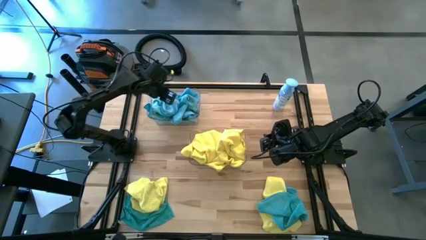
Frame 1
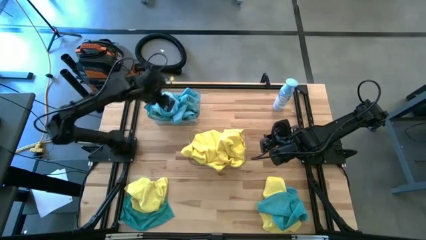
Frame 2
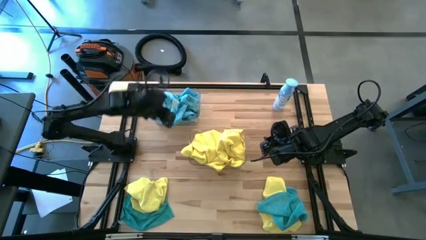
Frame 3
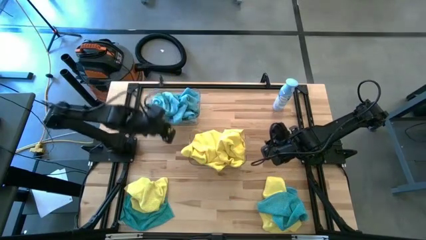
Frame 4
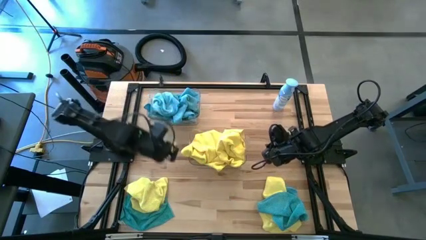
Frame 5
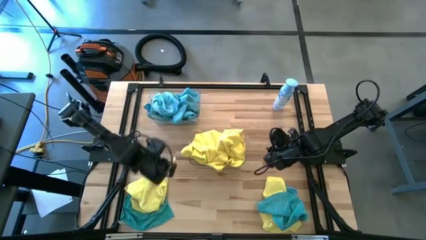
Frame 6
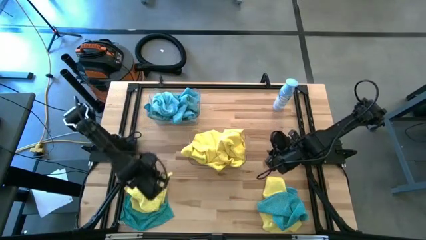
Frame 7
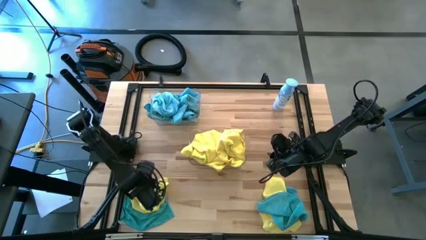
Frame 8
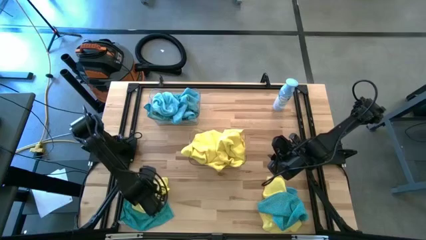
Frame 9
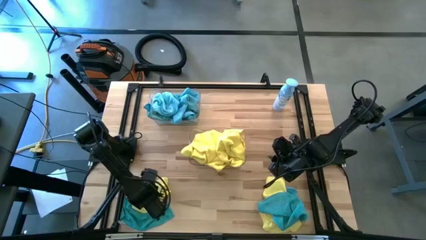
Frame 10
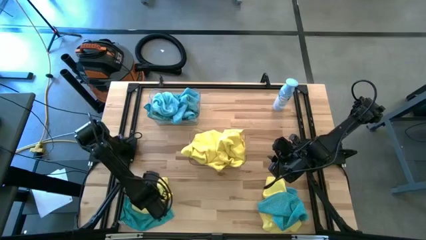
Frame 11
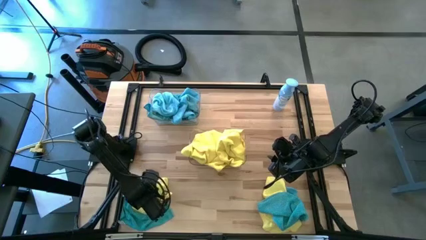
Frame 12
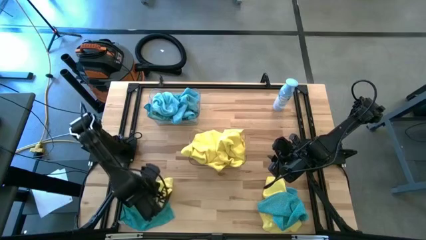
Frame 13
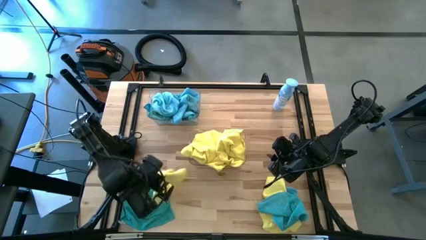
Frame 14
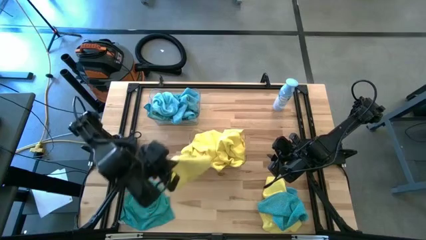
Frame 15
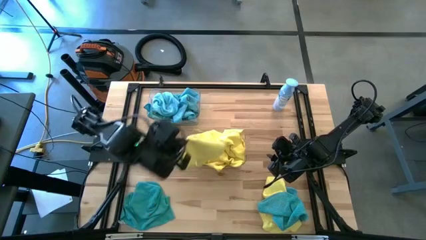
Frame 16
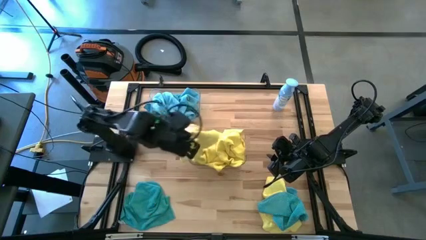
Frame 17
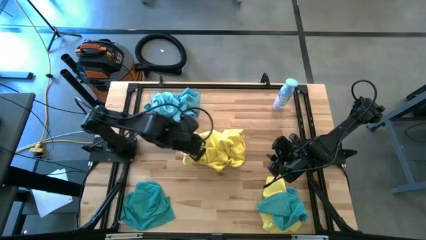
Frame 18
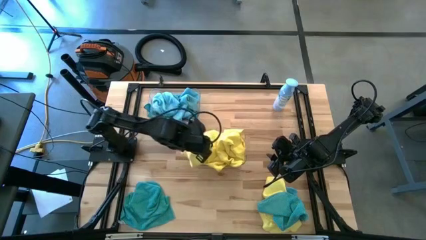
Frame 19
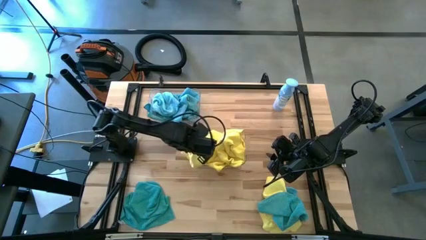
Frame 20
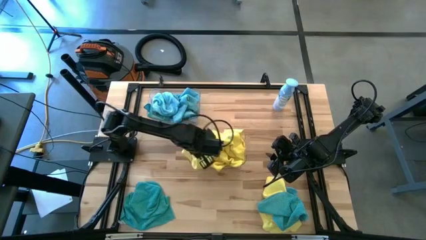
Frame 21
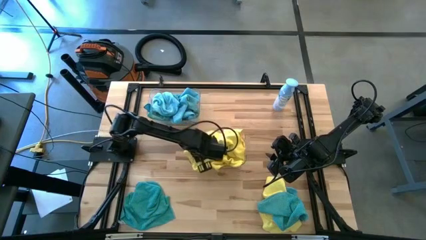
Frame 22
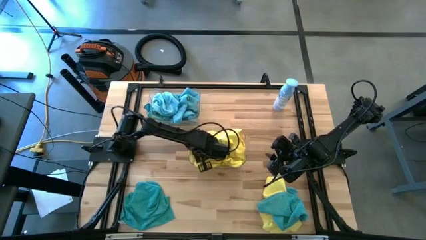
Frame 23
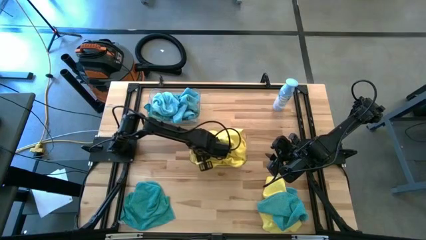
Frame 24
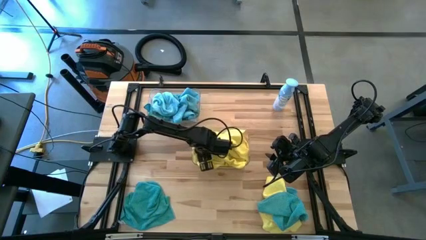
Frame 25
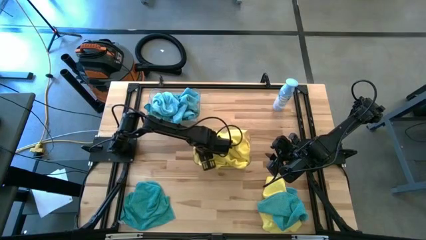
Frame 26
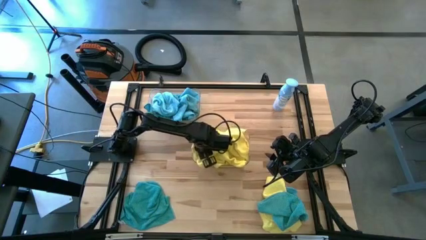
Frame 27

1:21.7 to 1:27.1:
Task: Sort microfiber towel by color & place in baskets
Put the yellow towel into the bottom transparent bin

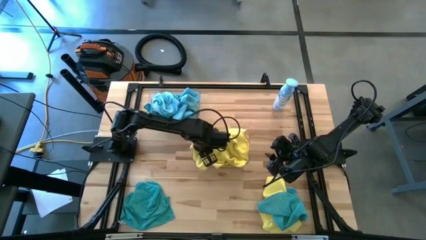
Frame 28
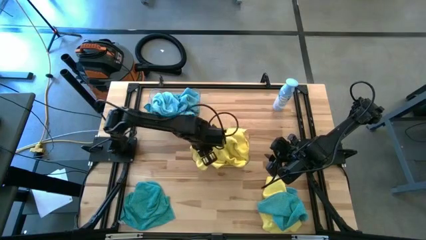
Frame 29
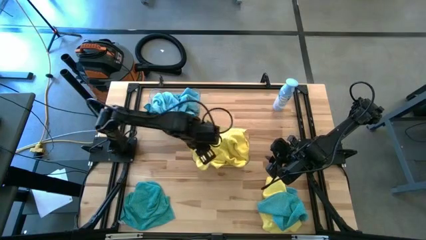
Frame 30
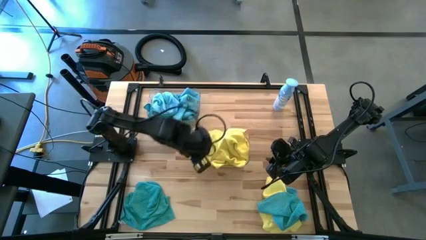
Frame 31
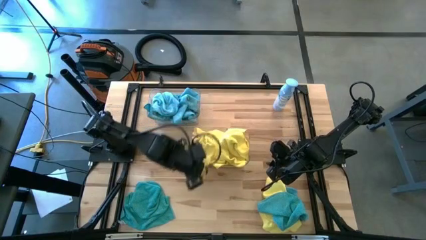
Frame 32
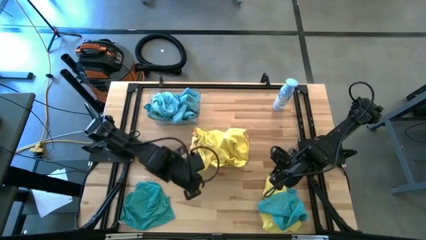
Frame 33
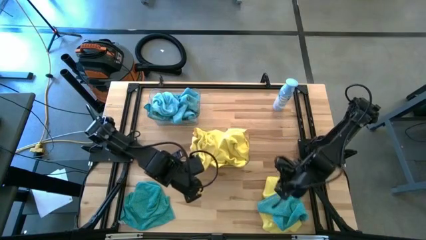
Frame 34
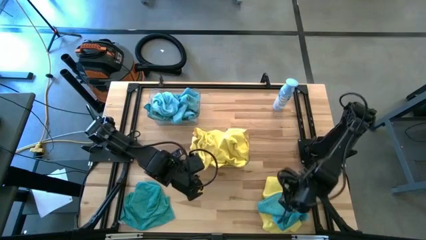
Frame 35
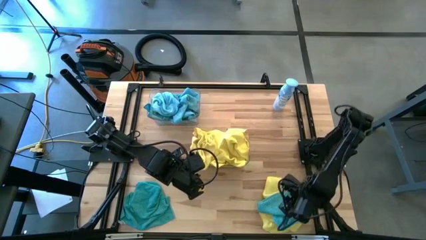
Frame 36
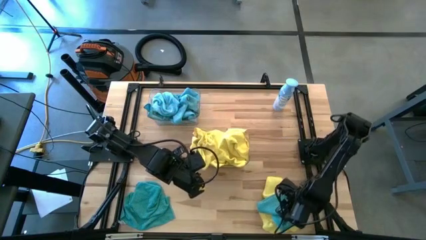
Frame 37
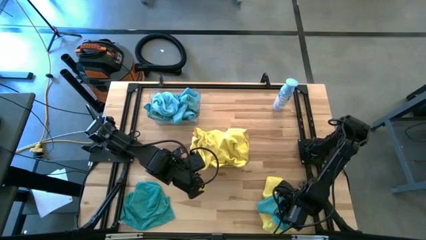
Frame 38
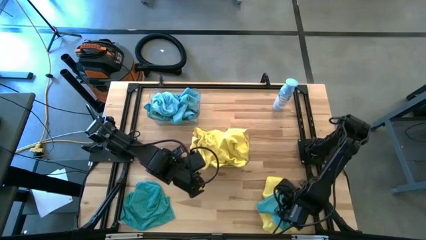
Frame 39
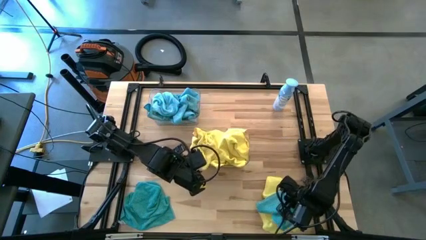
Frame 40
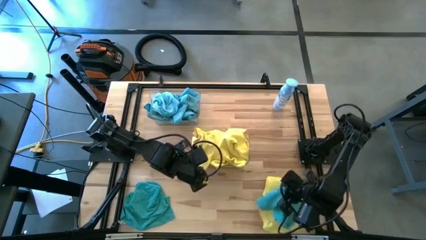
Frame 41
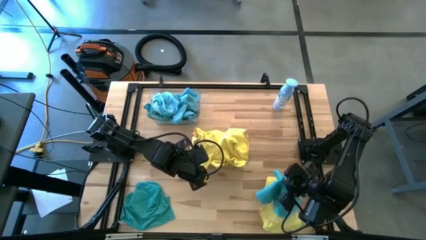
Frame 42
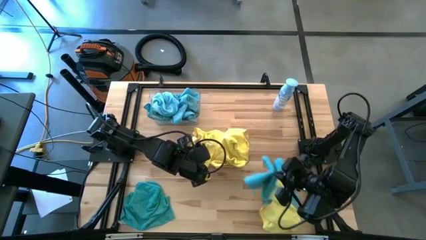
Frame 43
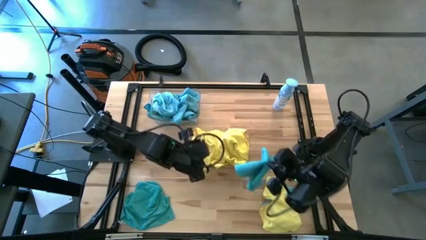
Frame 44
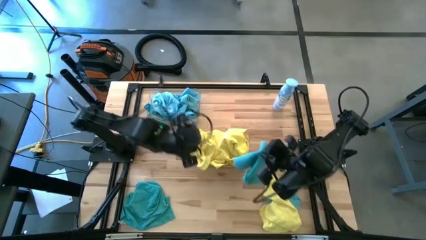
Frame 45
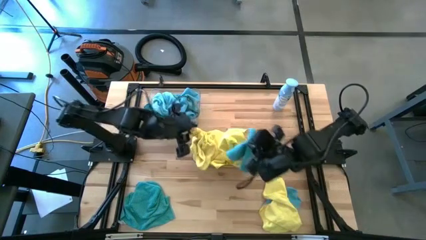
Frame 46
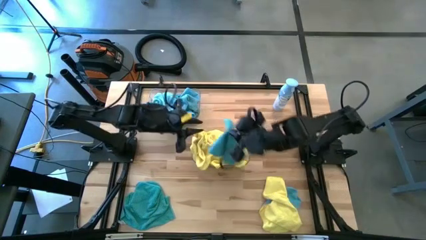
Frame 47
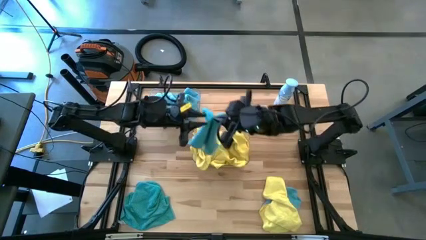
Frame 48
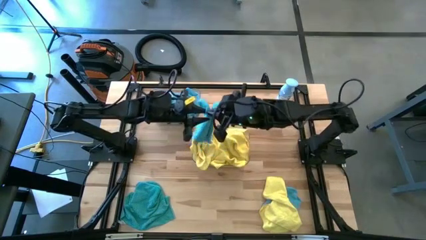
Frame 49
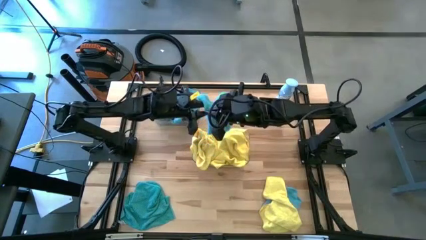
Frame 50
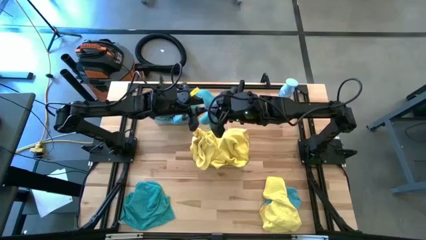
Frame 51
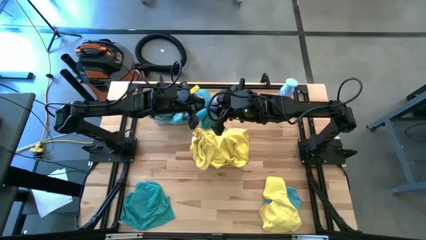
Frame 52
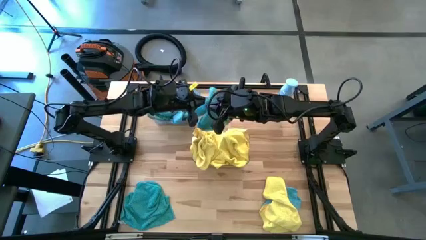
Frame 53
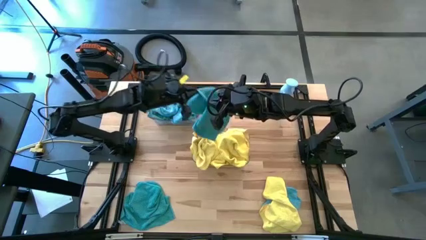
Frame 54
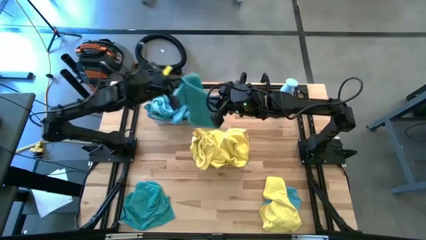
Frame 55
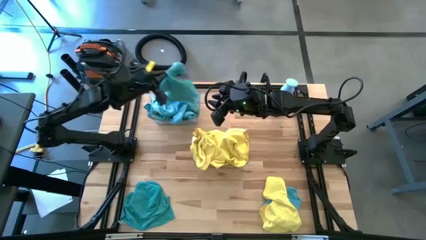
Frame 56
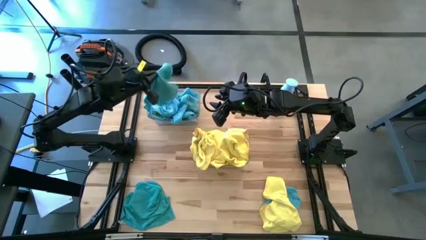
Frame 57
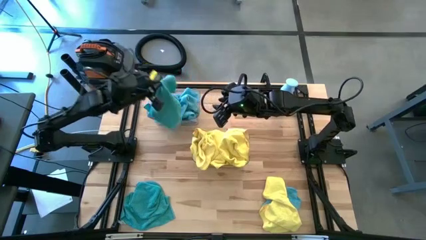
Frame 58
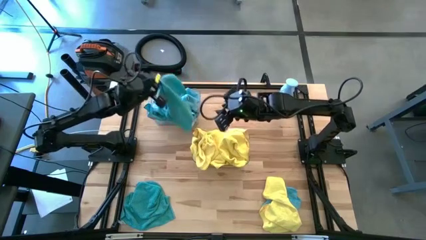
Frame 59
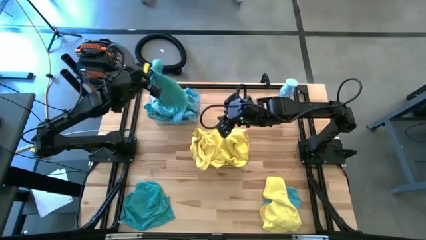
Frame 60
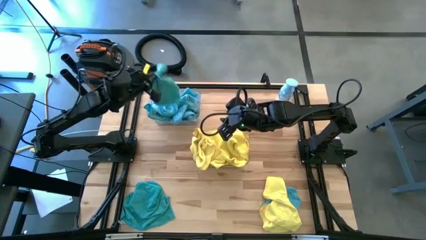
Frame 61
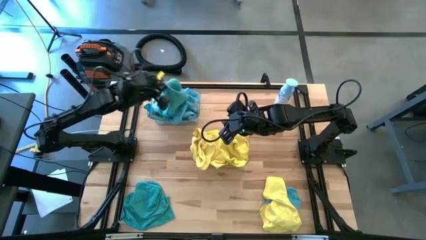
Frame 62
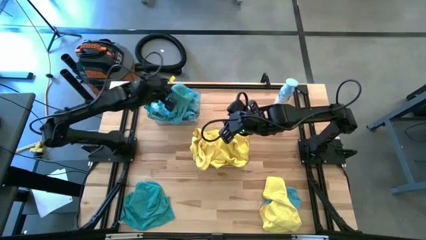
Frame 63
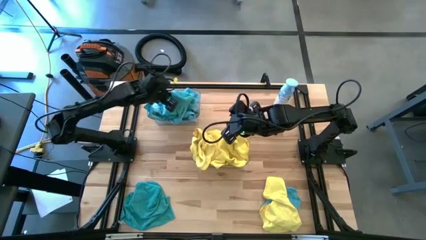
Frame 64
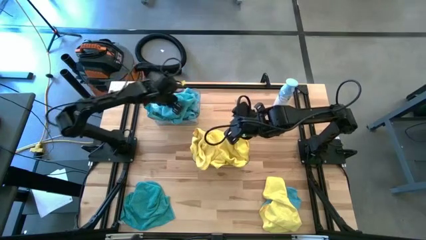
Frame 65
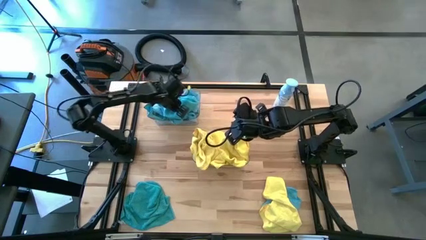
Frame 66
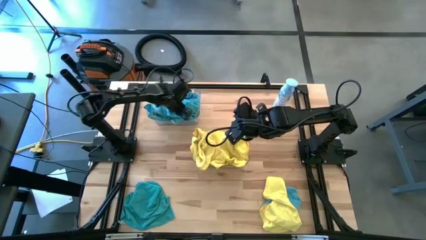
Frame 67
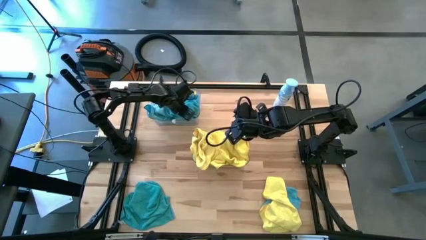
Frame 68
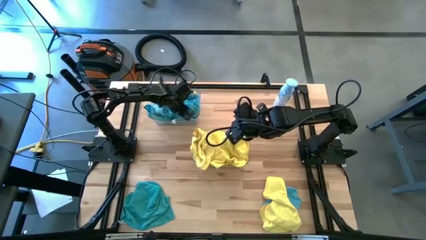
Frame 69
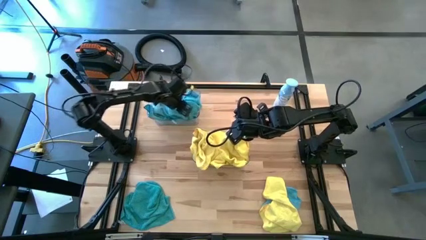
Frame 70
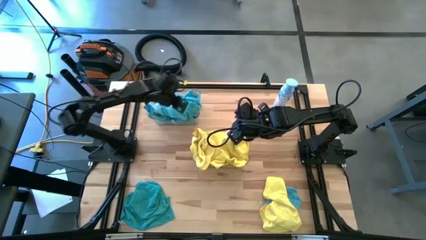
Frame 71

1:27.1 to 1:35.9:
Put the blue towel into the top transparent bin

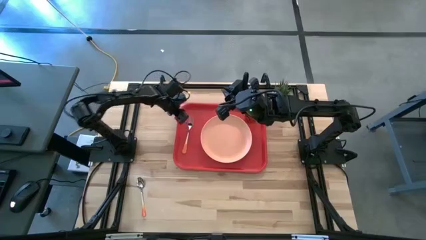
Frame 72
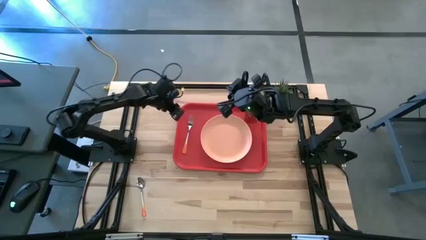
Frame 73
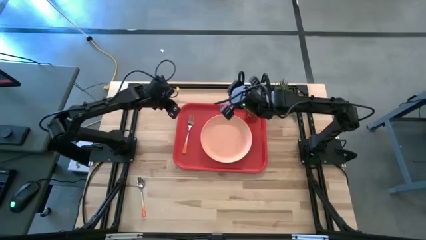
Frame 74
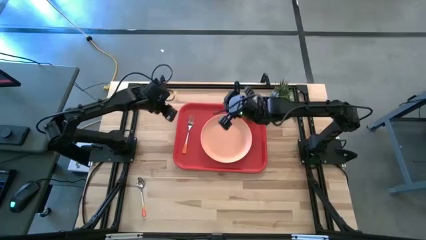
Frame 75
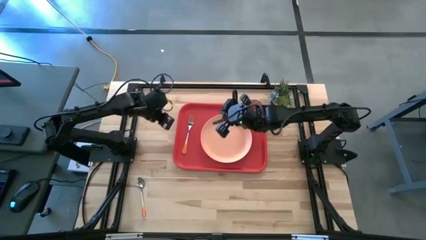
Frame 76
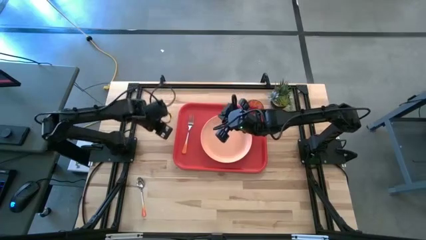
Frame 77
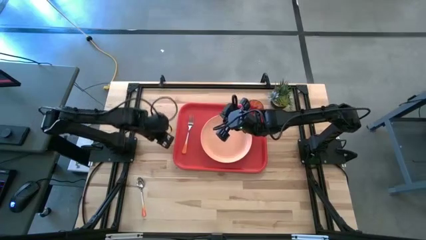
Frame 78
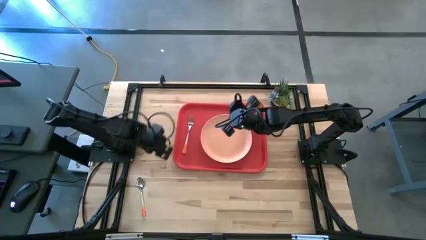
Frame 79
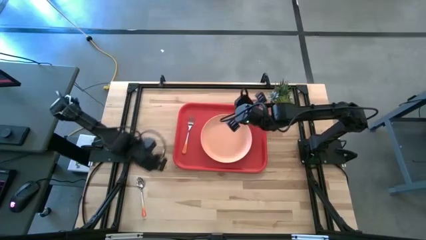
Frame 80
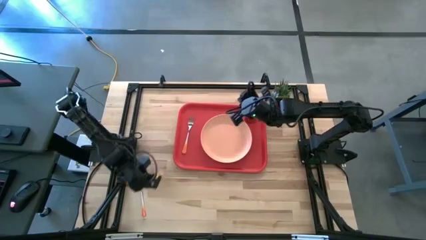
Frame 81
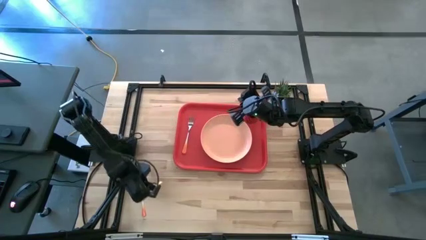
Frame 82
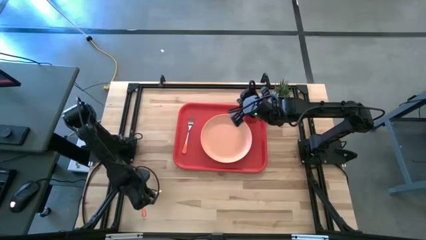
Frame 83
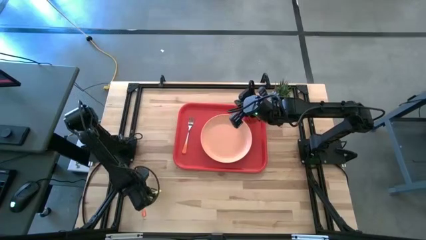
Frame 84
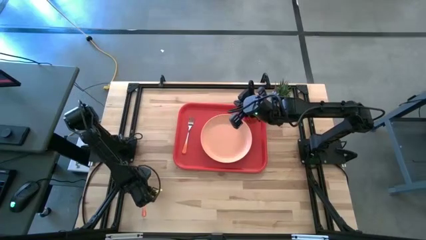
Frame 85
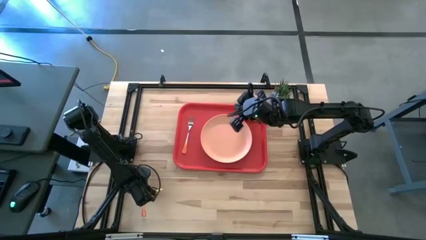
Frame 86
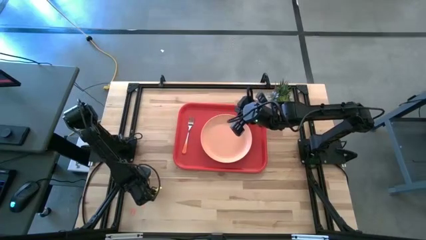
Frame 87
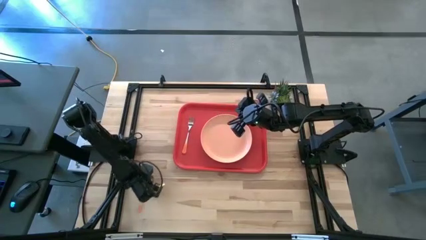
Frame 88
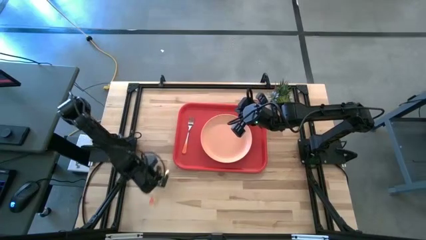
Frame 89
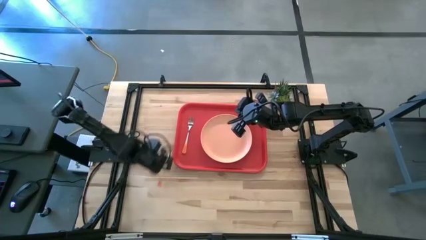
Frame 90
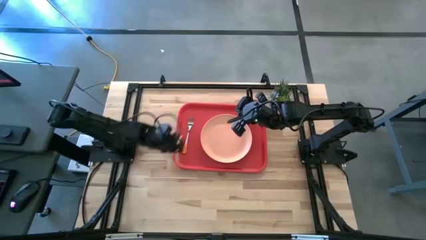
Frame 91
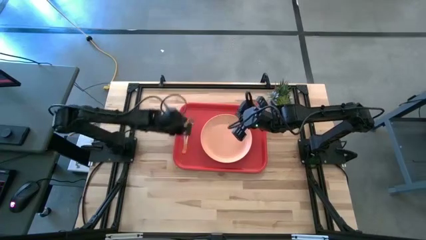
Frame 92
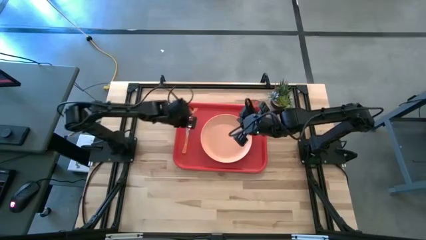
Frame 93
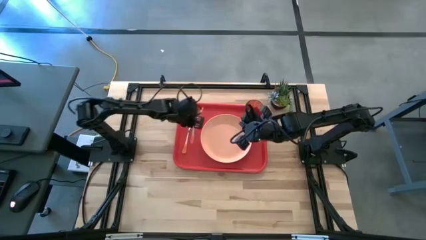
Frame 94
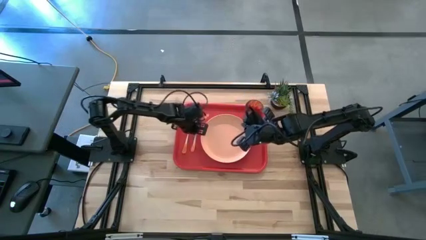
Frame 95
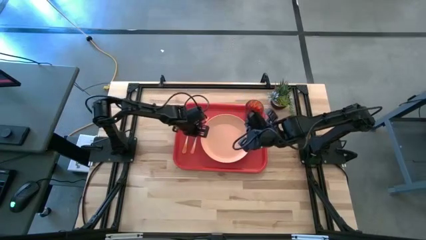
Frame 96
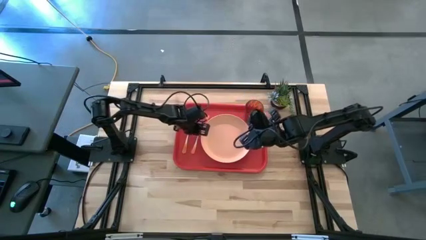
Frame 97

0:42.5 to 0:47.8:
Task: Pick and place plate/cup/fork/spoon on tray
Put the white orange spoon on the left side of the light orange plate
